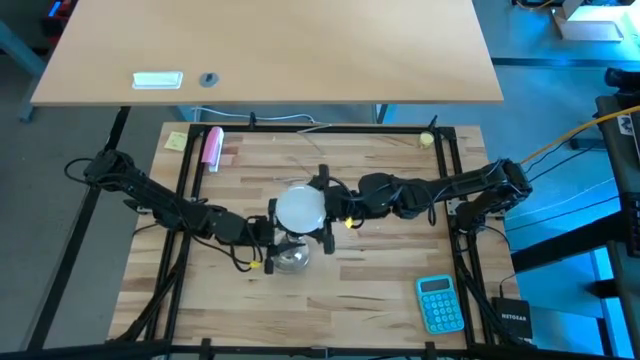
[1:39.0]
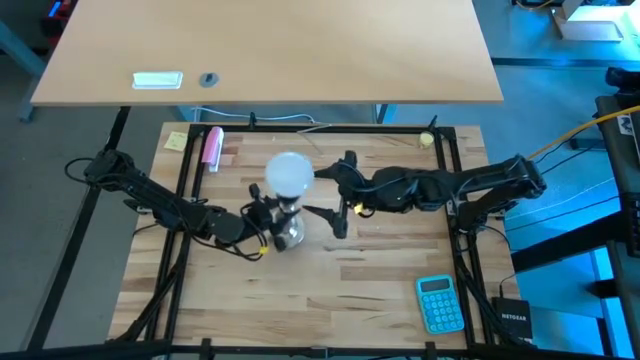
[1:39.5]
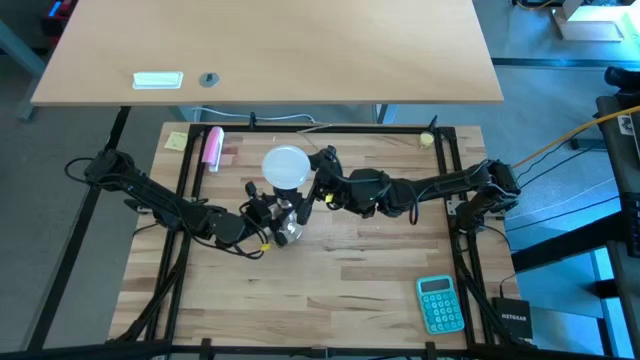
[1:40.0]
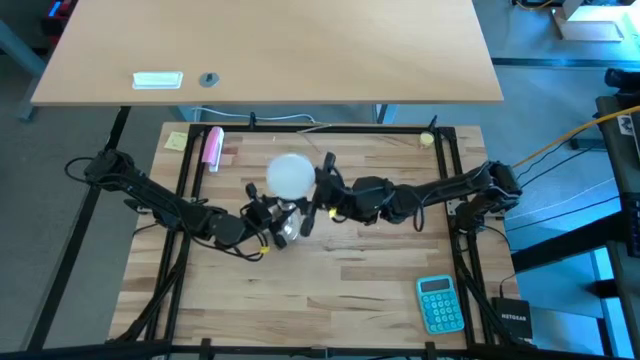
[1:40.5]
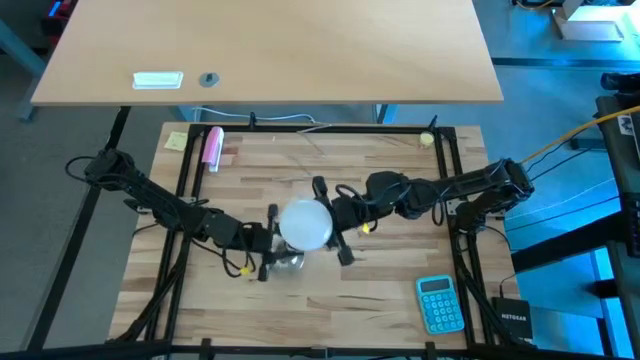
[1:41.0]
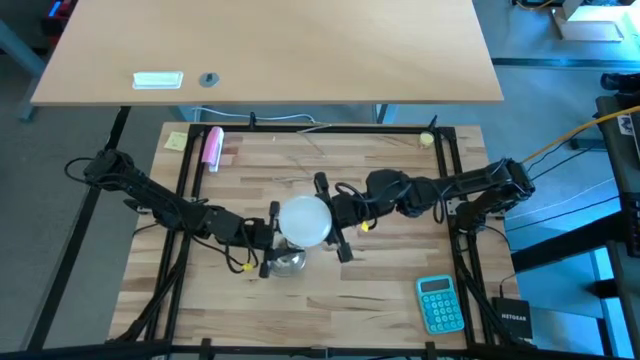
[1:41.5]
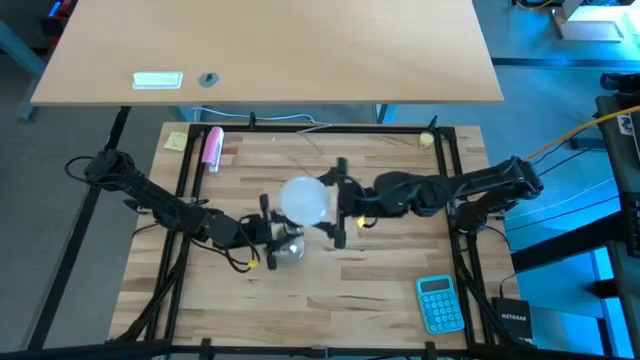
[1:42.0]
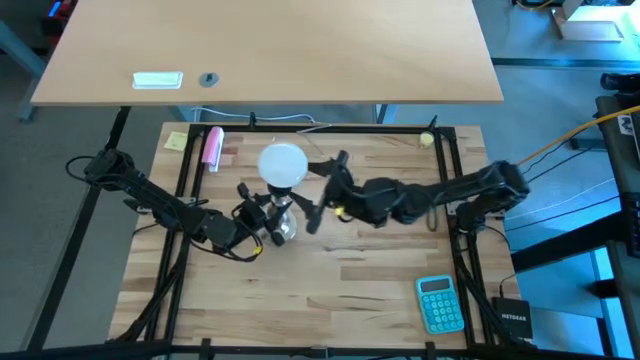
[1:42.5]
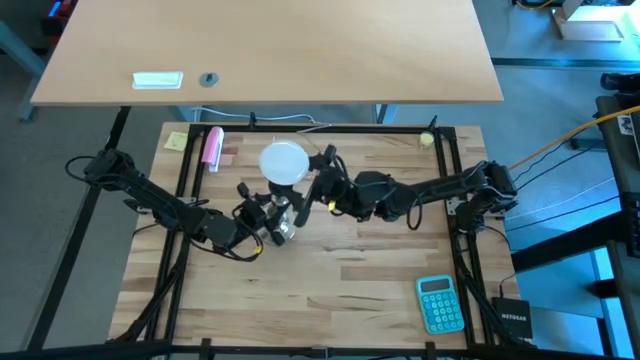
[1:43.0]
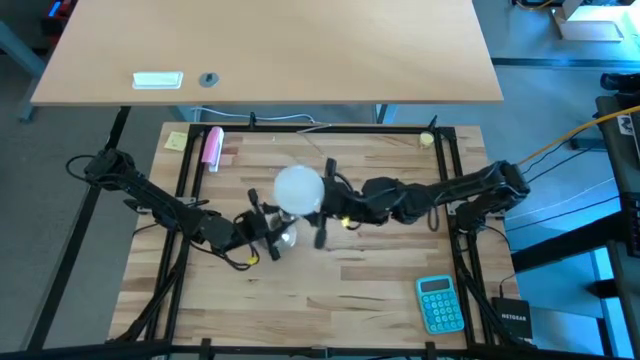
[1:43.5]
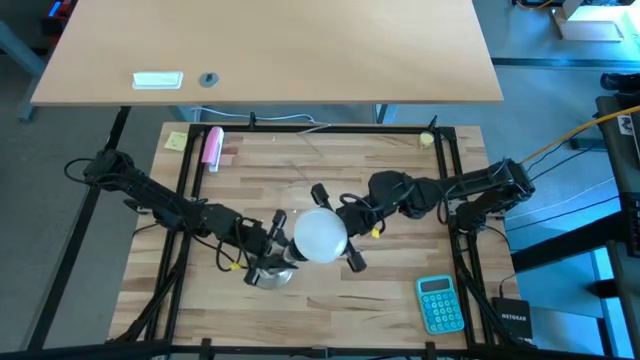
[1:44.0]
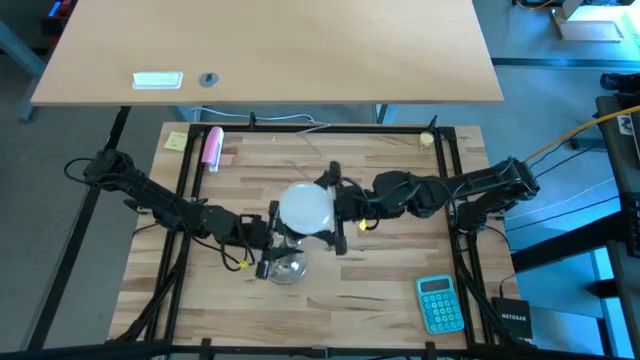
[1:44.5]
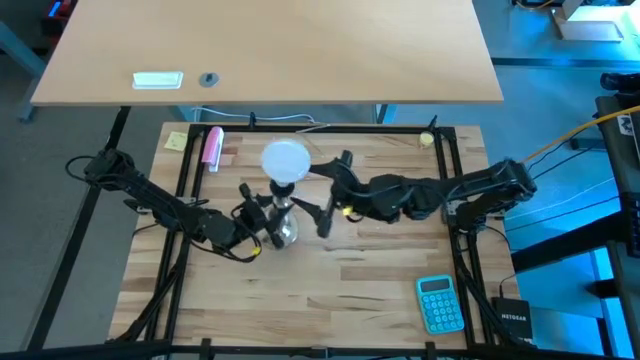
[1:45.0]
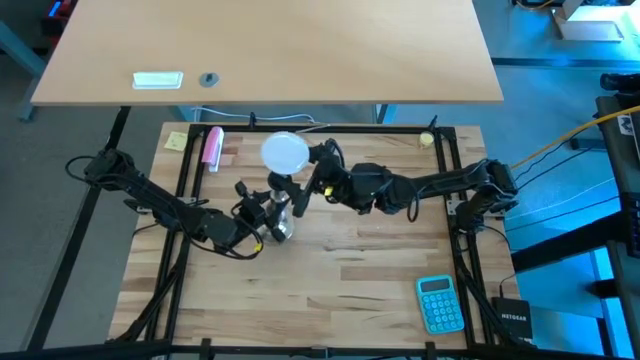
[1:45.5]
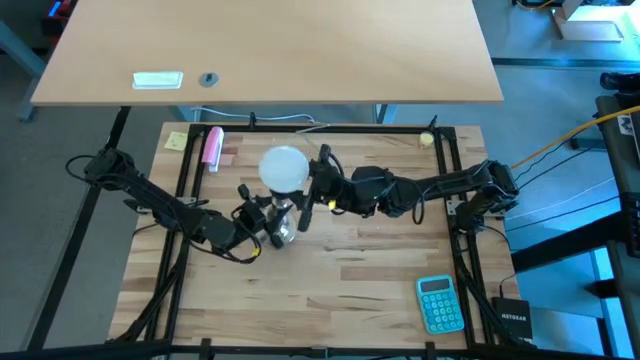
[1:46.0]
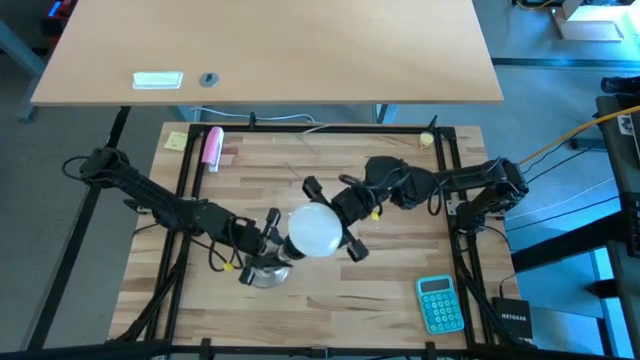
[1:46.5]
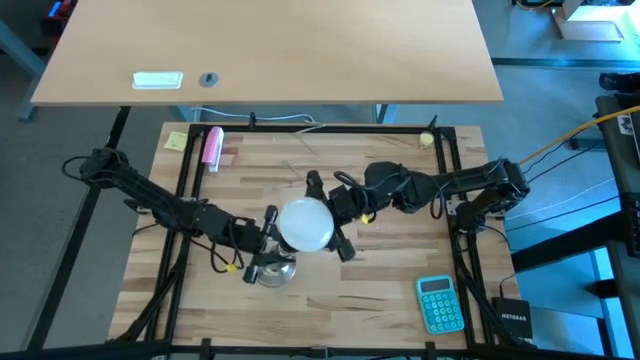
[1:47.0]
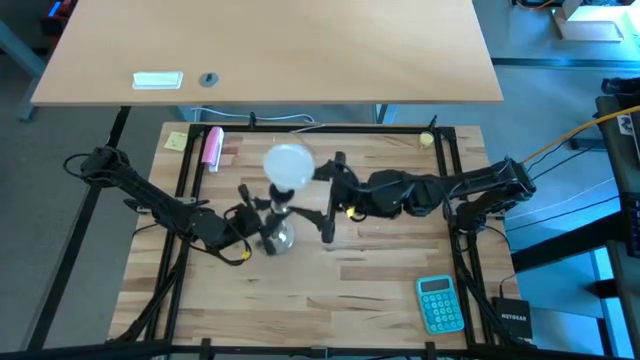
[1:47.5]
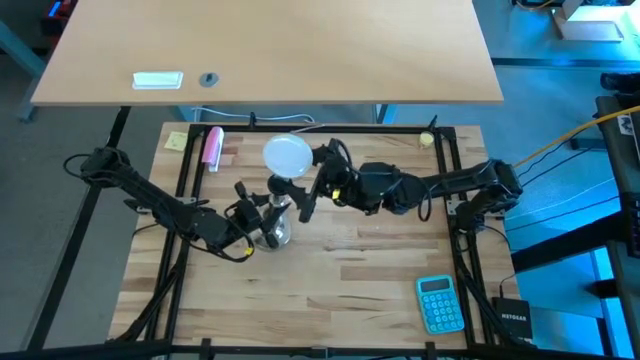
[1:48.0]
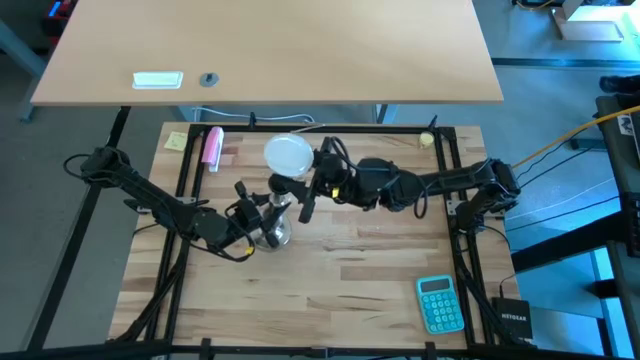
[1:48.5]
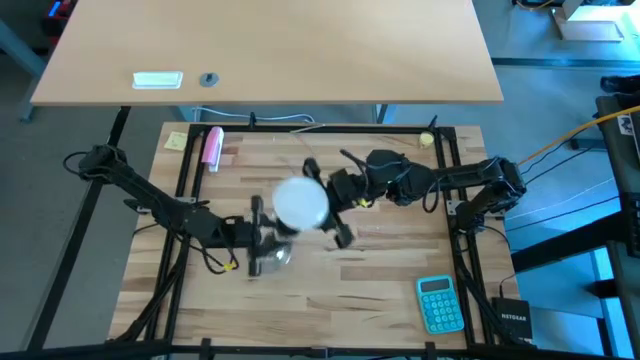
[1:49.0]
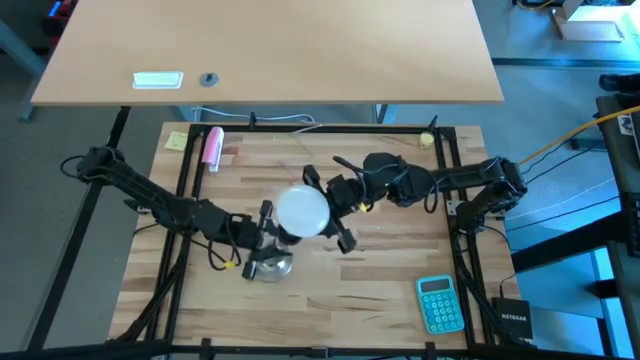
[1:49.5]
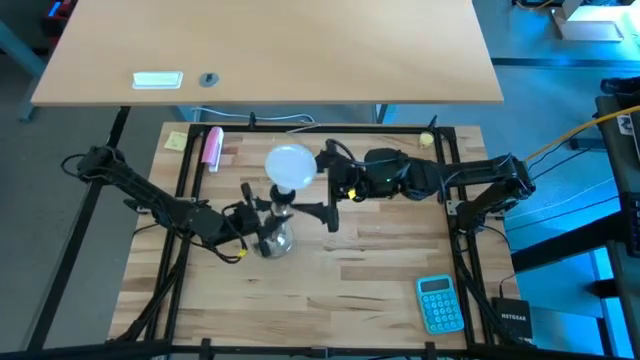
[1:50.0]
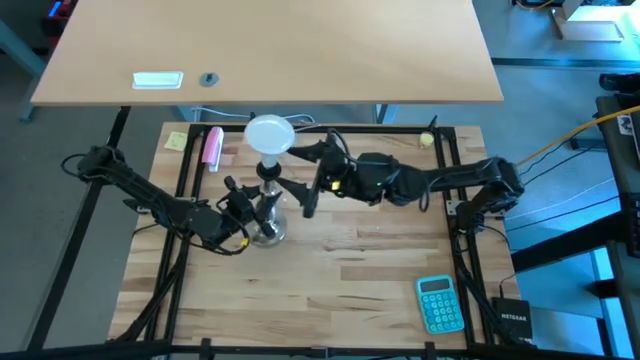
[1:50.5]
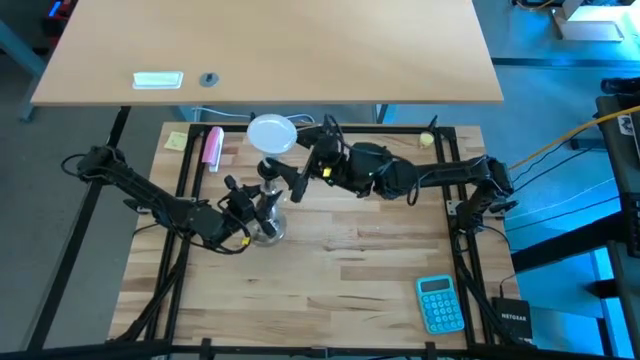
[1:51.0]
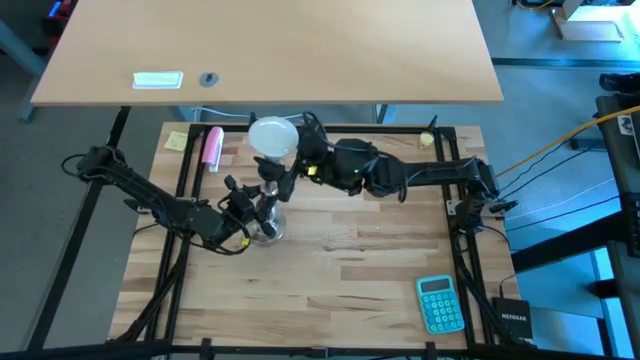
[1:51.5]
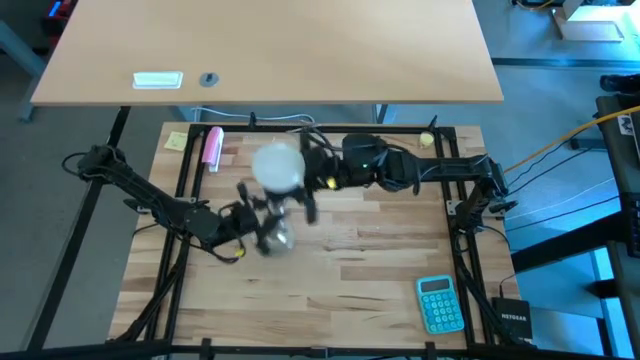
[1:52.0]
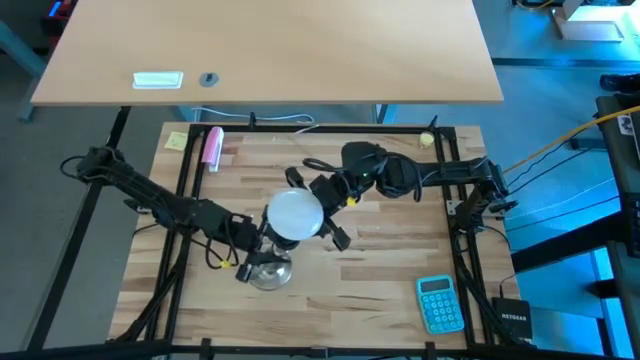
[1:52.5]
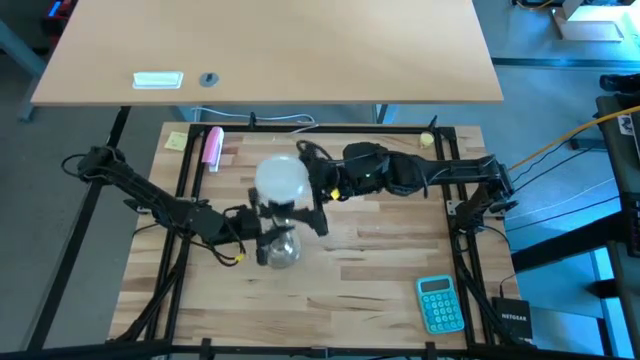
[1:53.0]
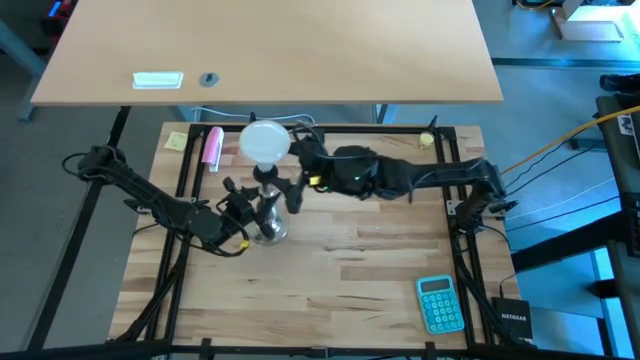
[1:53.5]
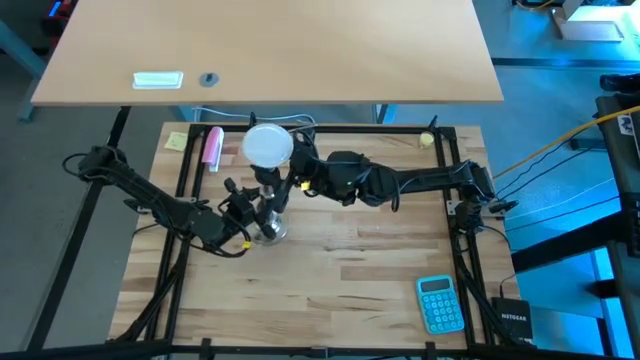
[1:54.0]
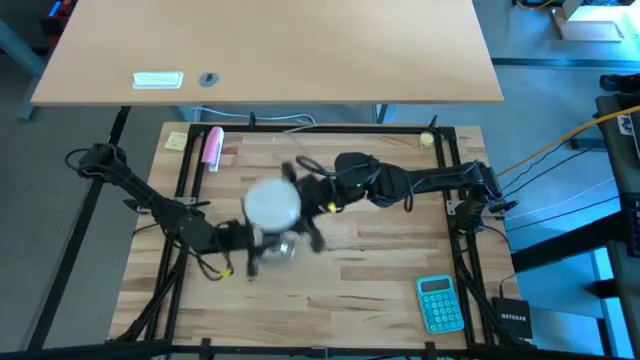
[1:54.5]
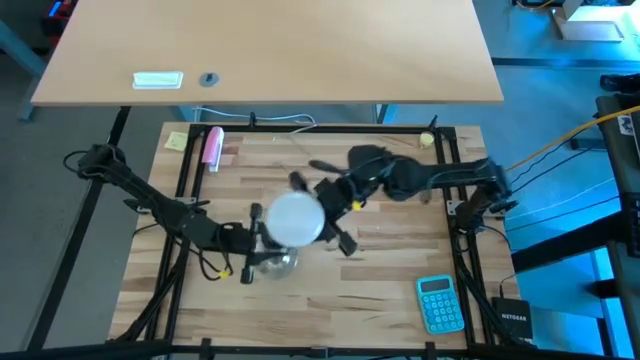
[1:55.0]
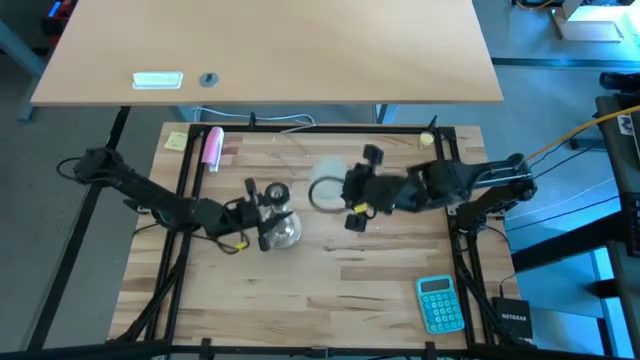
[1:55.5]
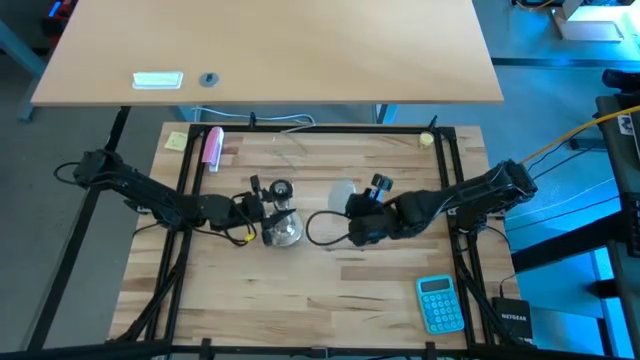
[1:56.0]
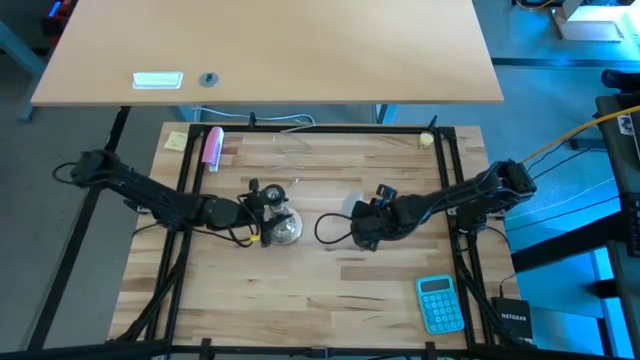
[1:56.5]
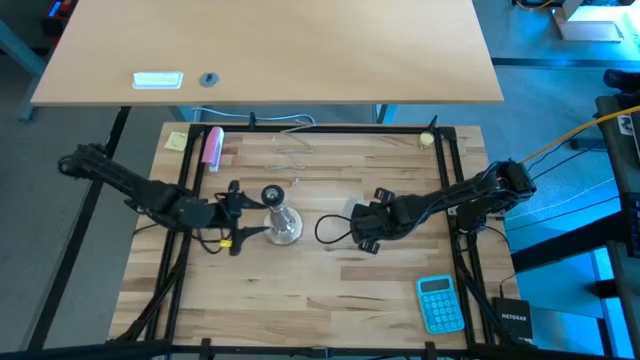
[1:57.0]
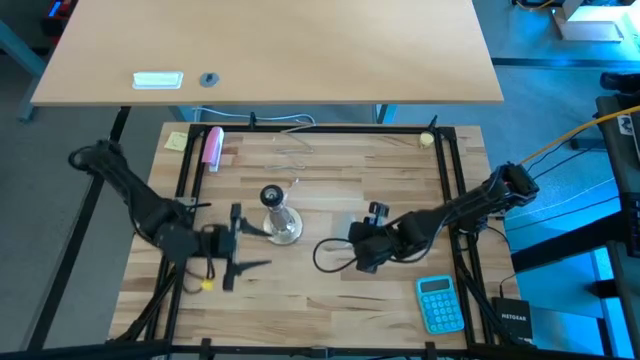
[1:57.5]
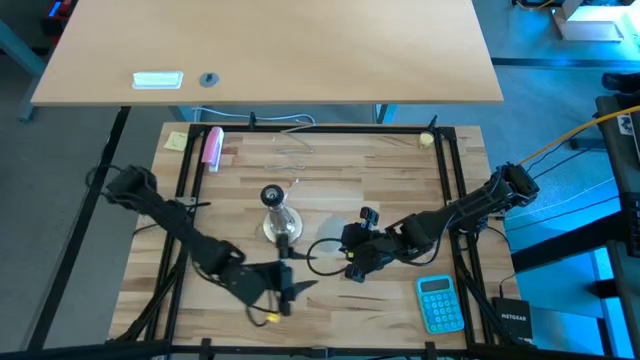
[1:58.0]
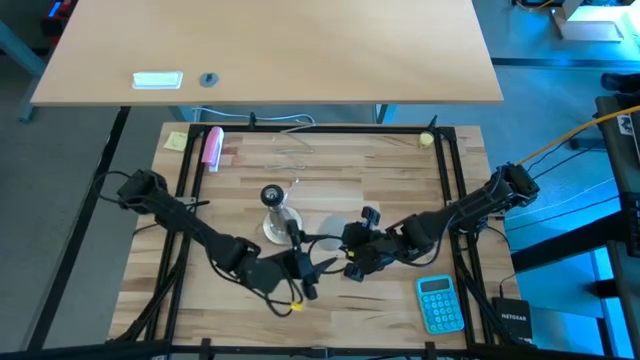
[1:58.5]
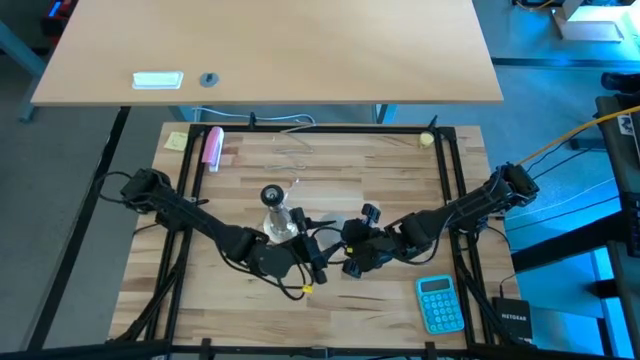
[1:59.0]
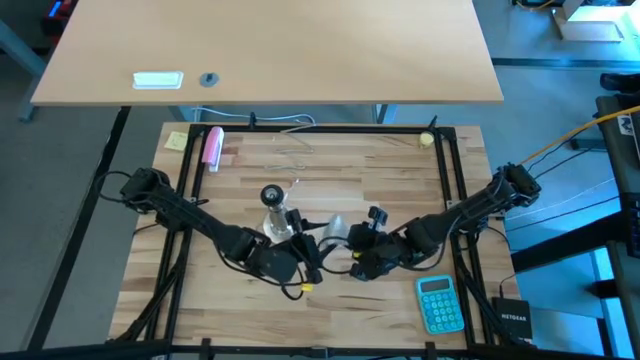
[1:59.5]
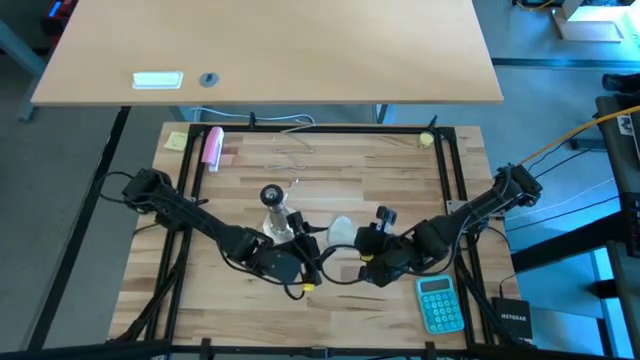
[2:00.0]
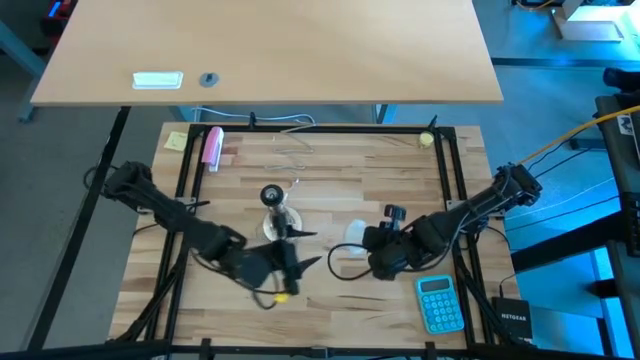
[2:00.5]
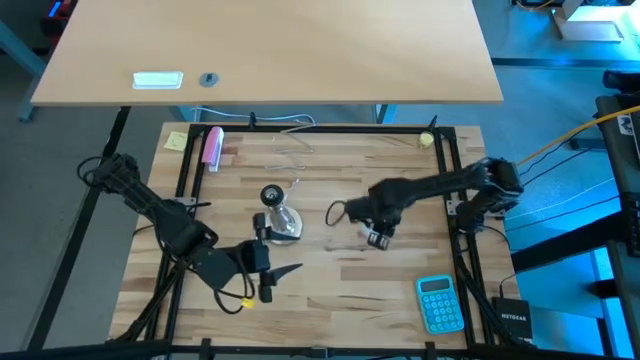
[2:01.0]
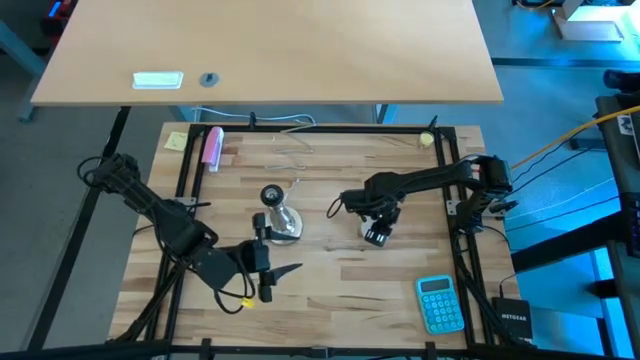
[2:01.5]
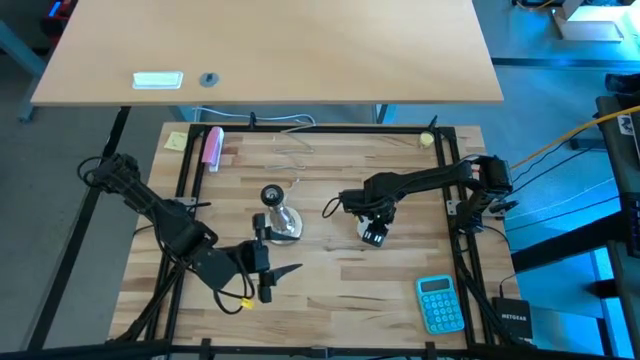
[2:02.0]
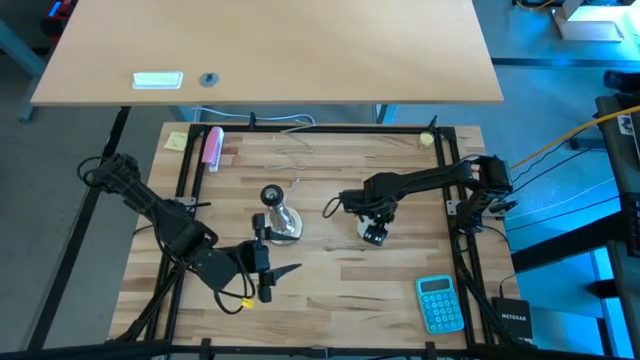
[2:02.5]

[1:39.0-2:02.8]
Task: Screw lightbulb
Remove the light bulb from the lamp
